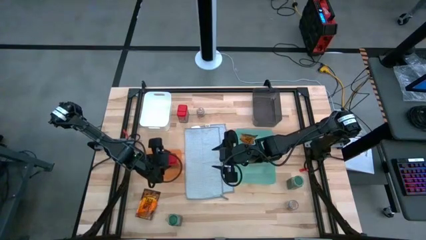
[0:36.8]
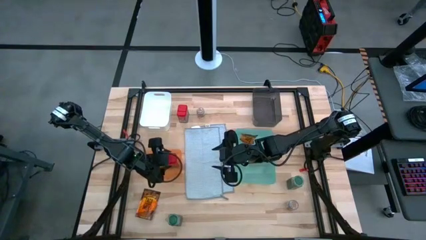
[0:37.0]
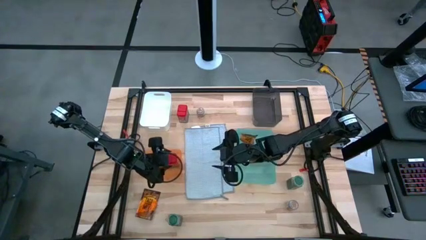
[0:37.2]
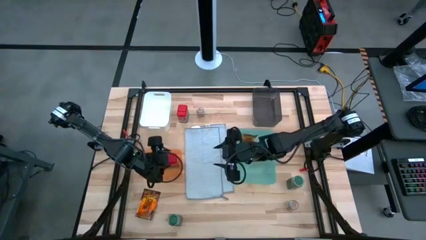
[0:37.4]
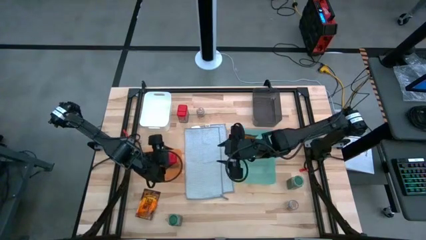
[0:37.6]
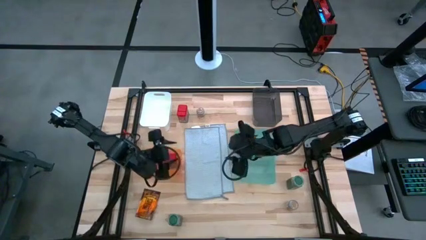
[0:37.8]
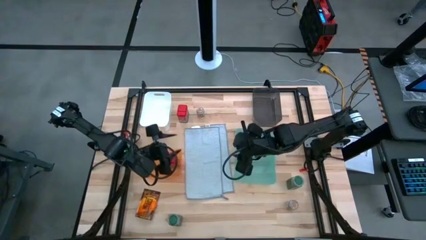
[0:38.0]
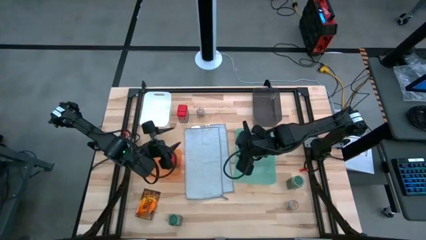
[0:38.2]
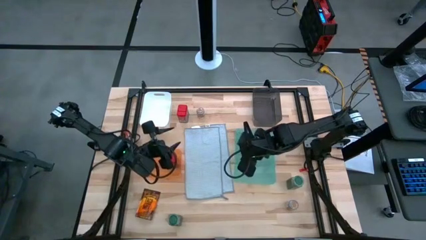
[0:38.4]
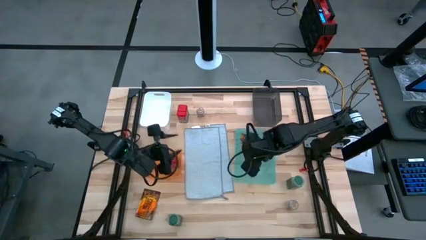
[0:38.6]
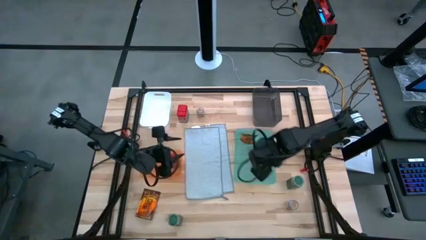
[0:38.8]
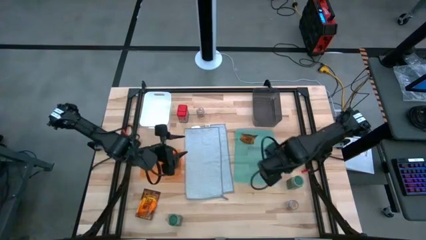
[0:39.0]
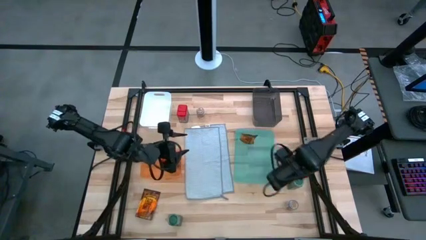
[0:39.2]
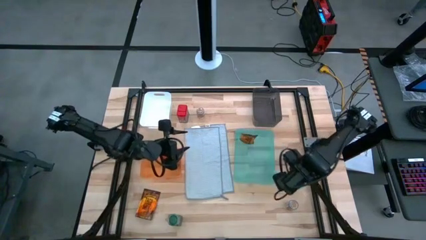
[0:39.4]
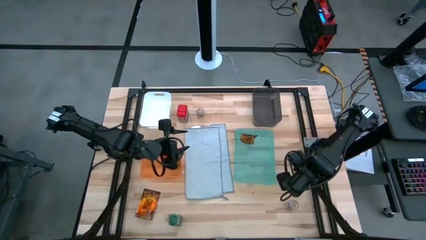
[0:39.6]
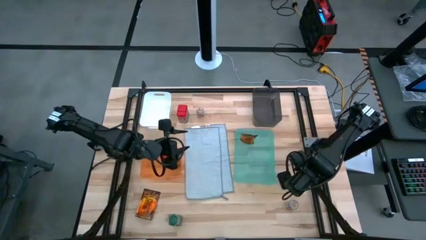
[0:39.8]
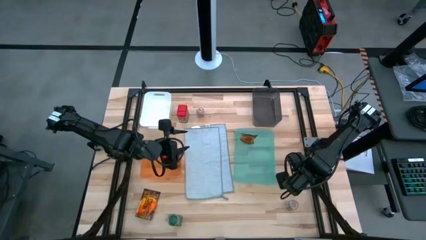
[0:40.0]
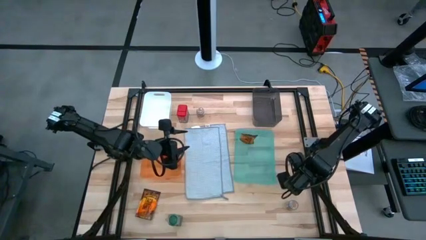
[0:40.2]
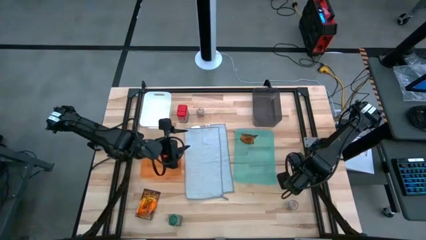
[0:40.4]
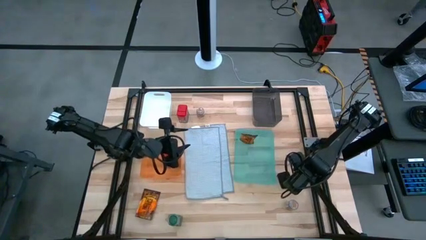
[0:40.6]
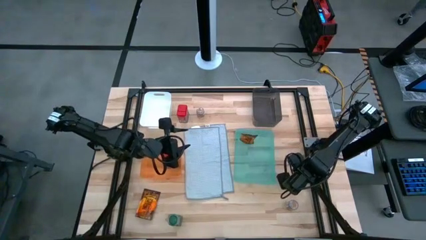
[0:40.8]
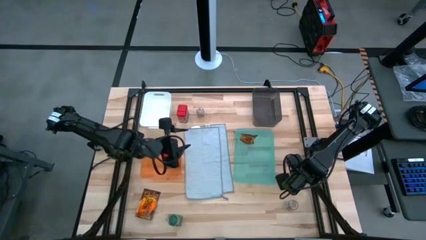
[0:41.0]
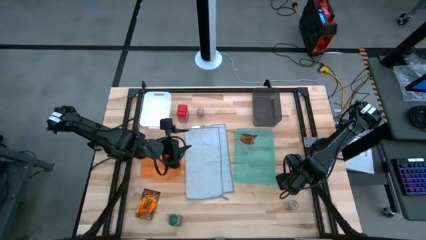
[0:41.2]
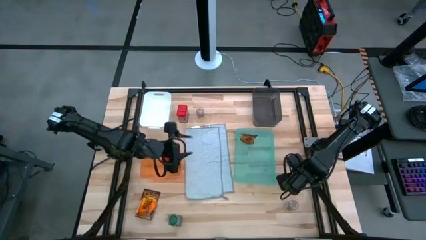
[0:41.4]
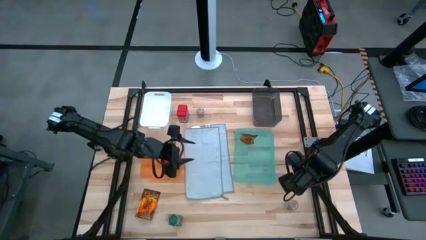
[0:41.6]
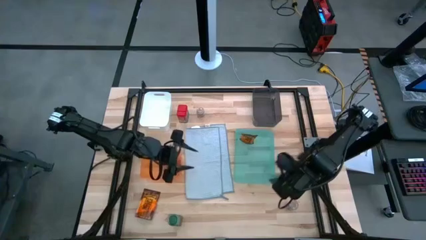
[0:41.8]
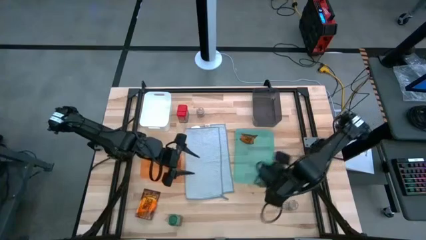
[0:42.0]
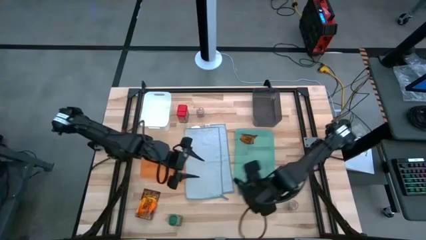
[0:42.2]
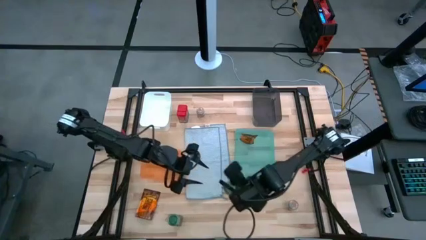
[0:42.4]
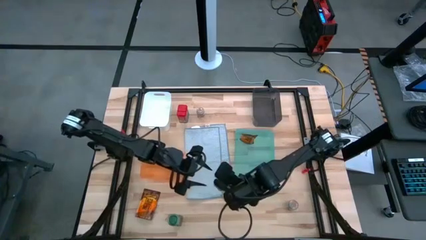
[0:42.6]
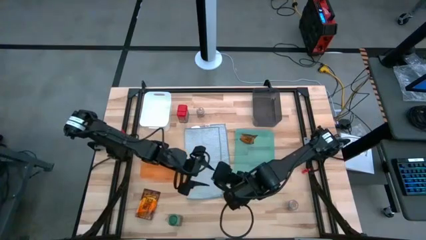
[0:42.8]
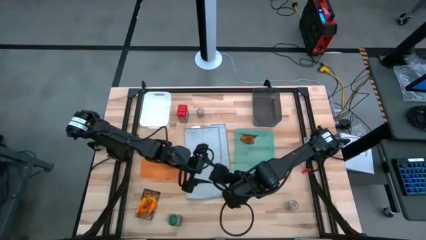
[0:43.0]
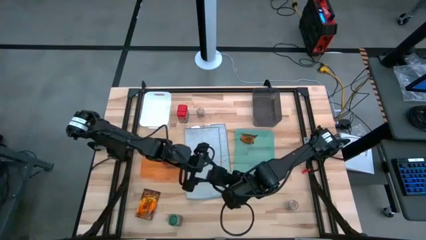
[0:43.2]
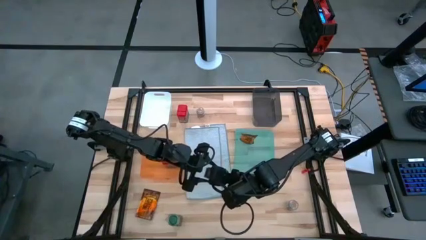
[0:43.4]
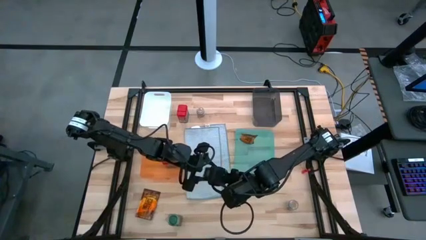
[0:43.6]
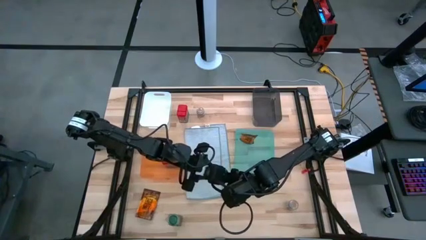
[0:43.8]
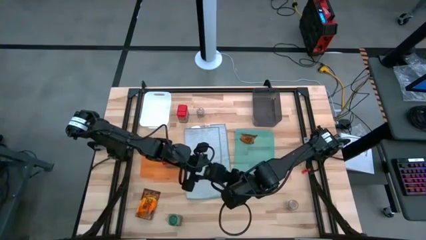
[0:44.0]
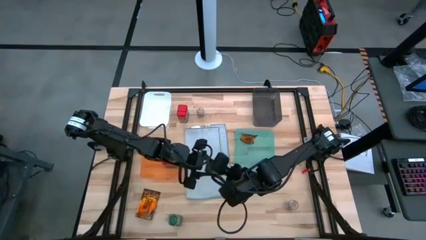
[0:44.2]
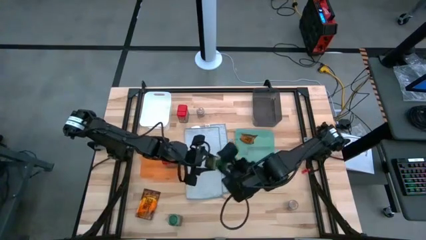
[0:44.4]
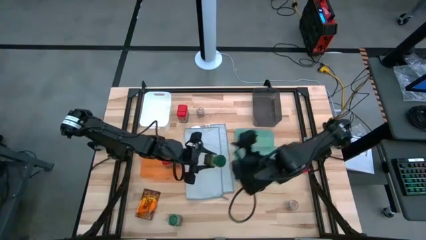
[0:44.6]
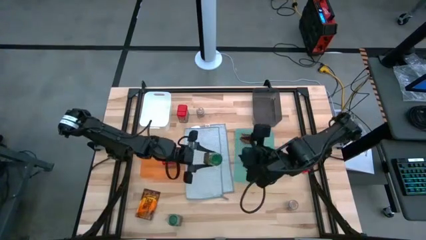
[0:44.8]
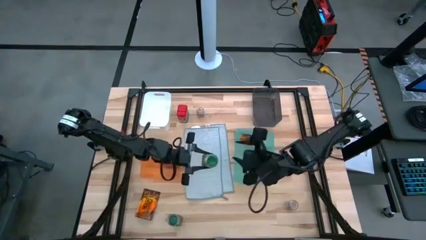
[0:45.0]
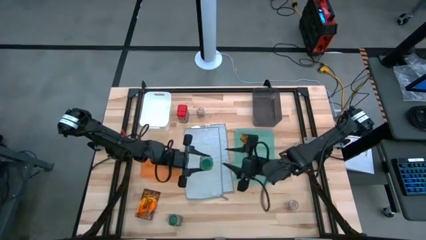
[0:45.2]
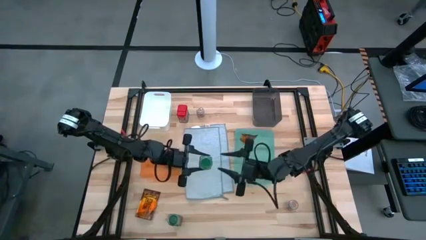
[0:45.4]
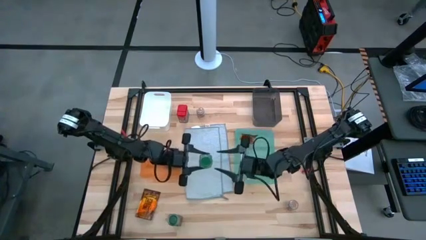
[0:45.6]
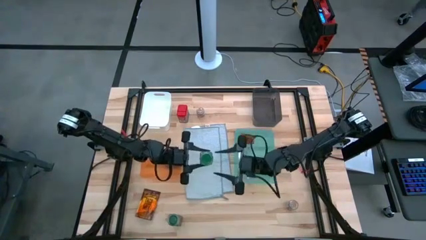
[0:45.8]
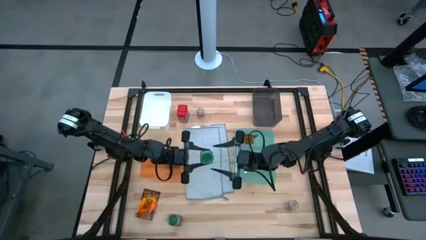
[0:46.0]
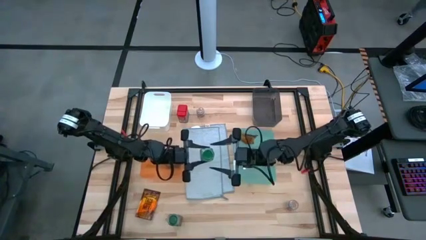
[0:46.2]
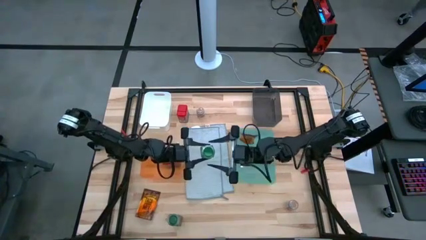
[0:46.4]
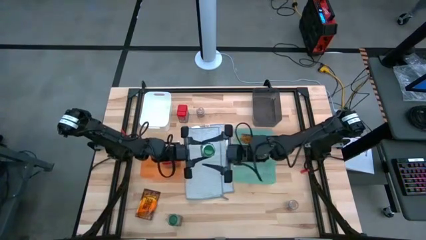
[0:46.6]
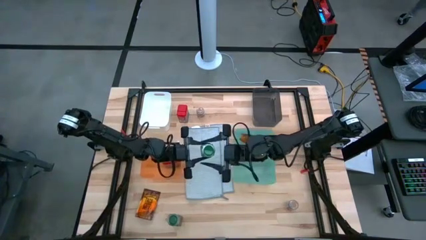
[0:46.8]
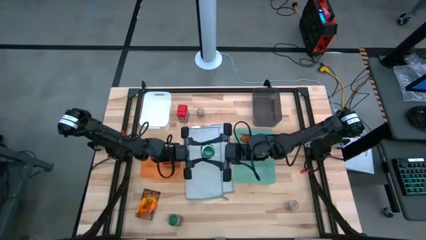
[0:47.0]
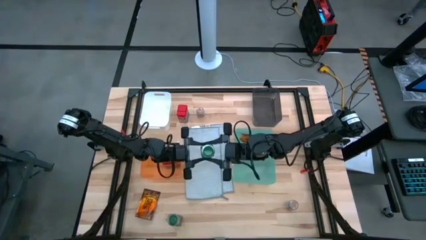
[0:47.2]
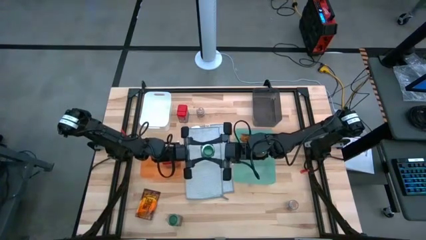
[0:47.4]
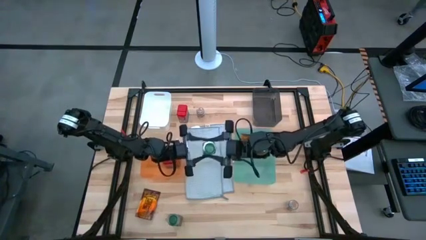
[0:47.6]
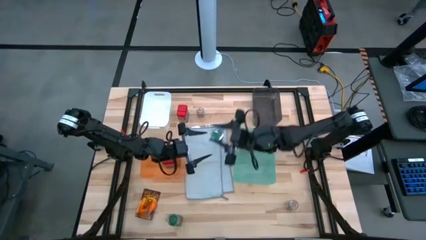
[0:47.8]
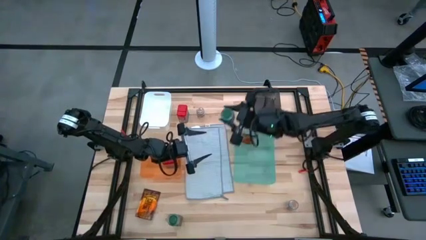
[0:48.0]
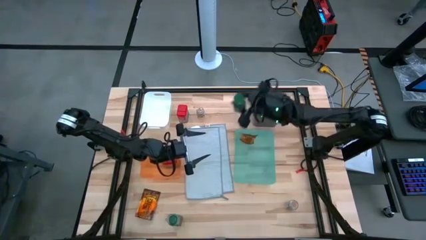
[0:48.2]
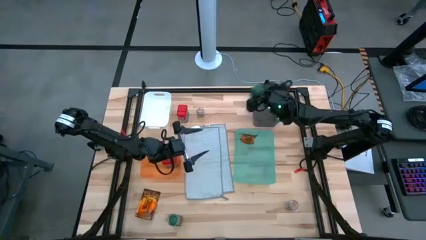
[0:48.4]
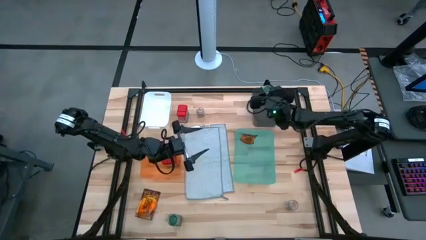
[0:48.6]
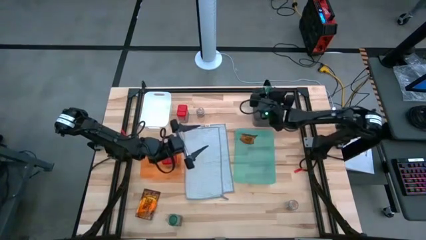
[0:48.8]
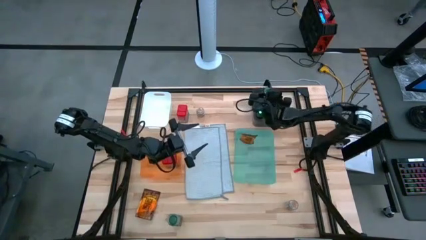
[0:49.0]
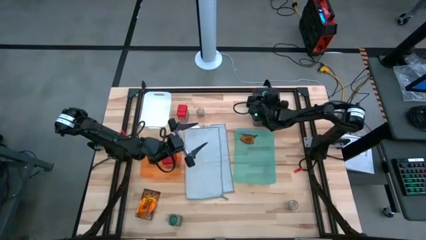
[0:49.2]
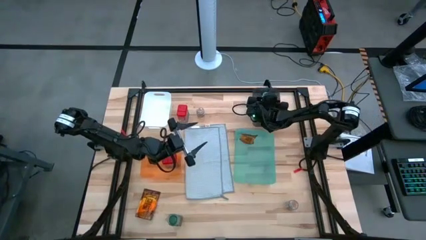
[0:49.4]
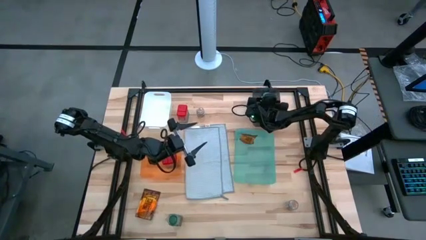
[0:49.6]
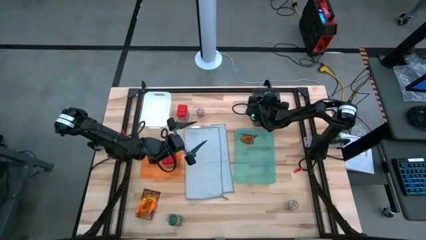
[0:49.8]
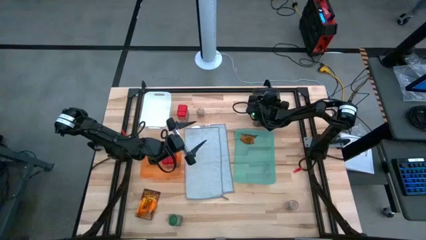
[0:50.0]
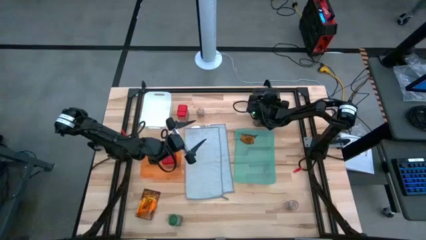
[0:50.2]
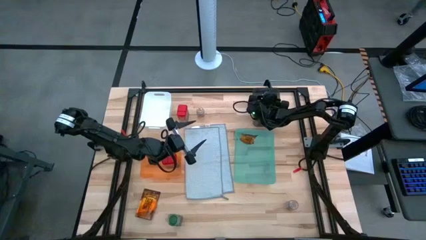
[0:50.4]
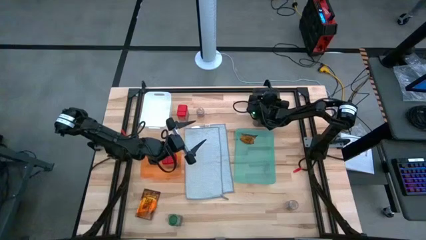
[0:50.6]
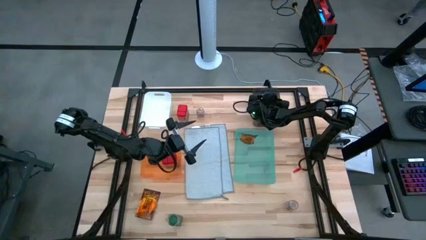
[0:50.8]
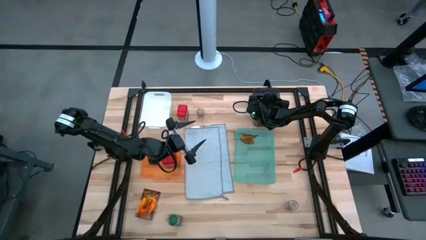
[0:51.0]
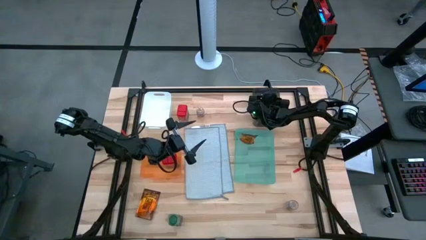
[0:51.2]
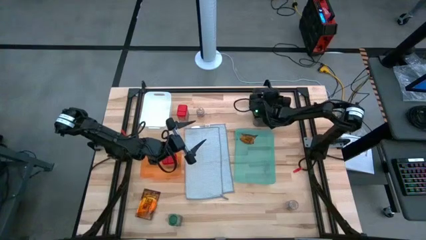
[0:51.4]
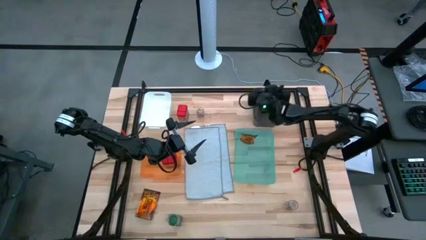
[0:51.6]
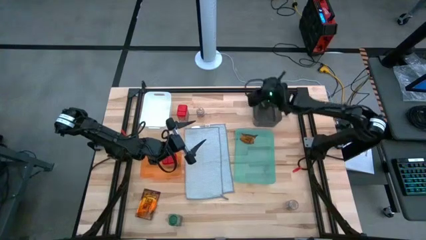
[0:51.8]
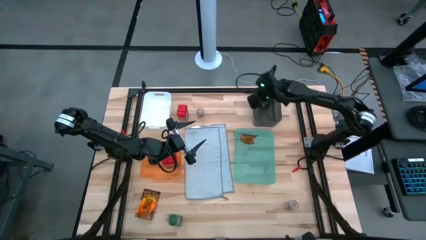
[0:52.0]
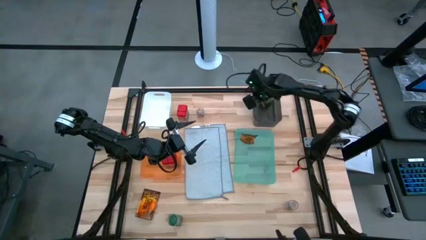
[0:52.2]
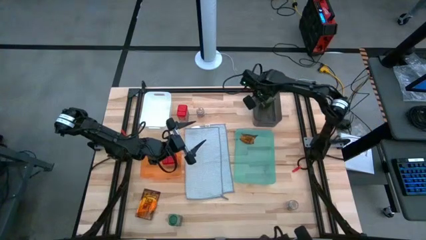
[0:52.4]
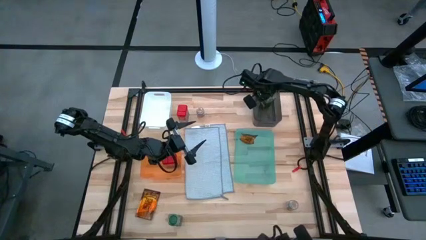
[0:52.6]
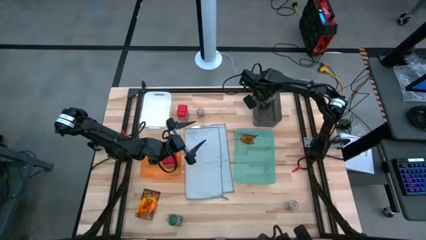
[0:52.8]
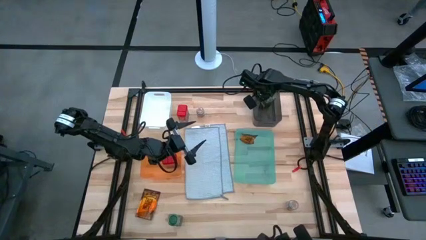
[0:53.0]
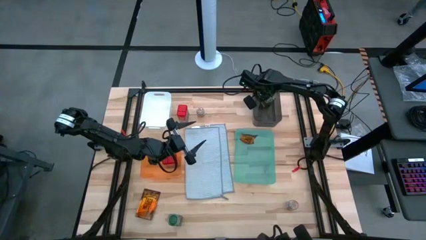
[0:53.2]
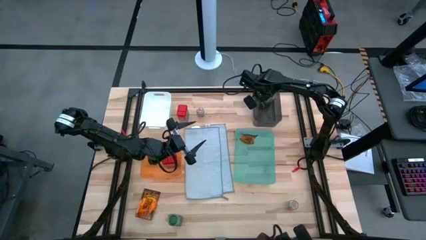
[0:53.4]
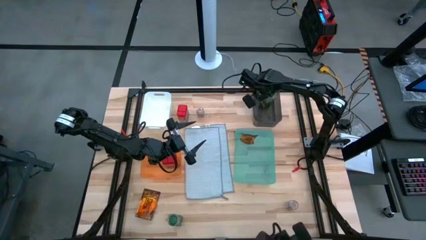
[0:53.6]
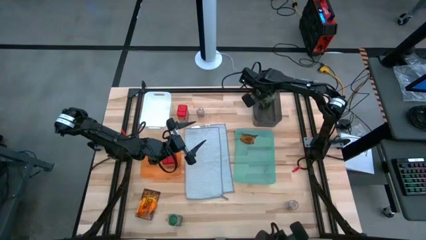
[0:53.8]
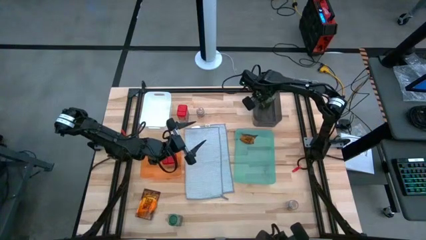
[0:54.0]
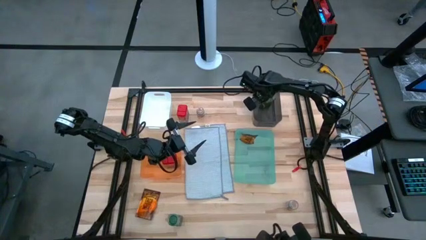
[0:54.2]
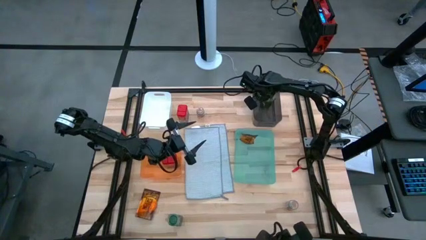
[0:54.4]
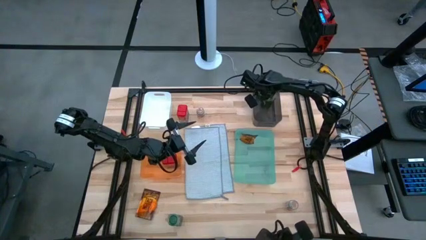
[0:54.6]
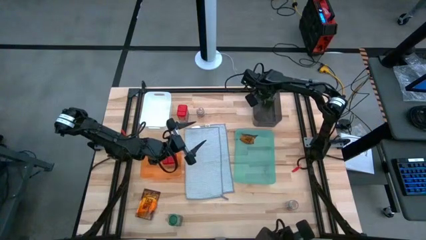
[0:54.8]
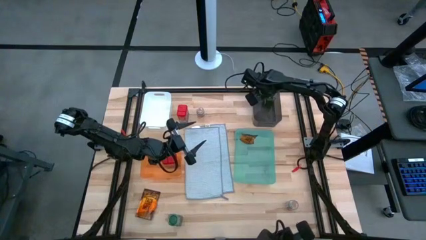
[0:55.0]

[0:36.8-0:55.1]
Task: Sort spices by type
Put the right green seasoning bottle into the black bin
